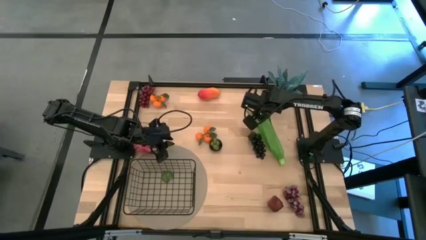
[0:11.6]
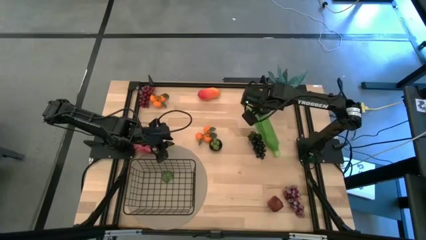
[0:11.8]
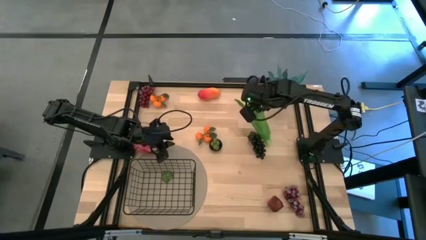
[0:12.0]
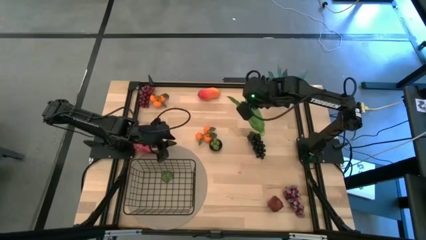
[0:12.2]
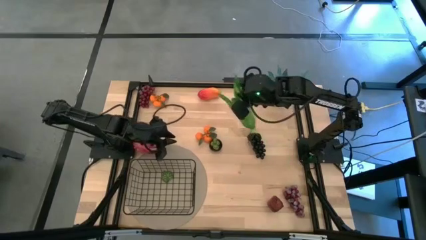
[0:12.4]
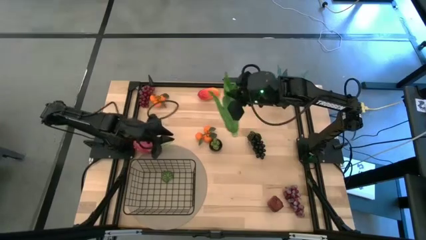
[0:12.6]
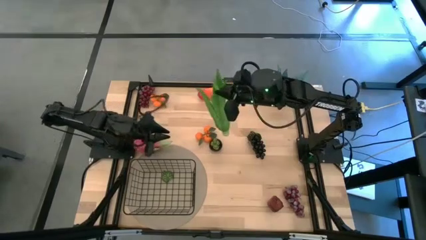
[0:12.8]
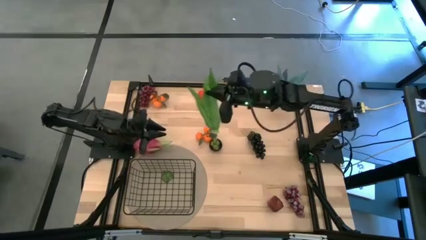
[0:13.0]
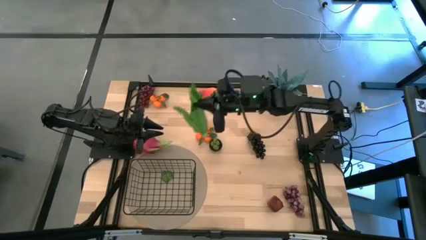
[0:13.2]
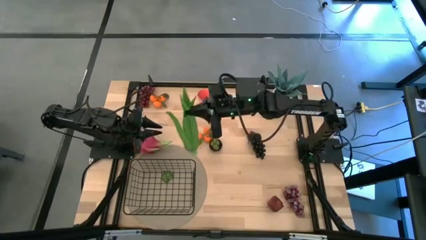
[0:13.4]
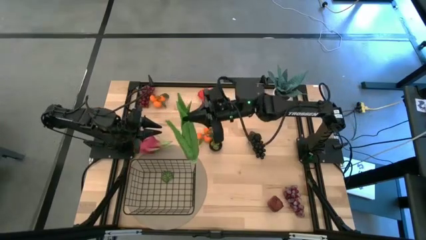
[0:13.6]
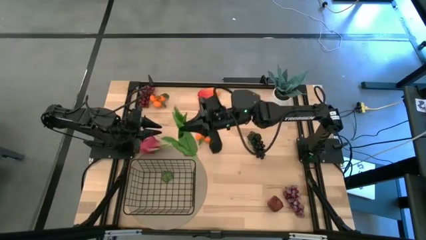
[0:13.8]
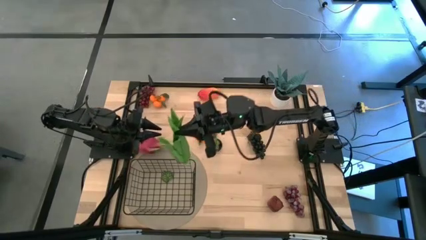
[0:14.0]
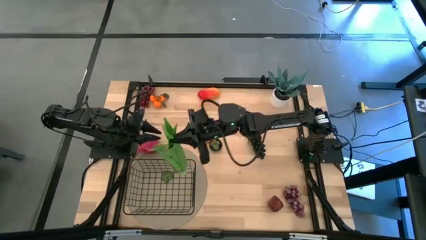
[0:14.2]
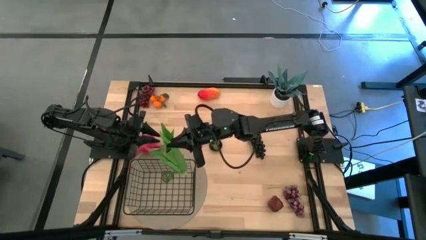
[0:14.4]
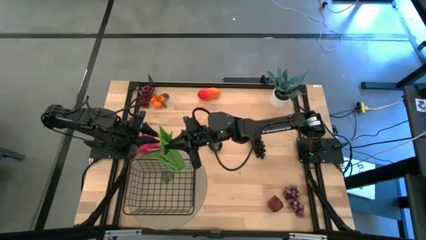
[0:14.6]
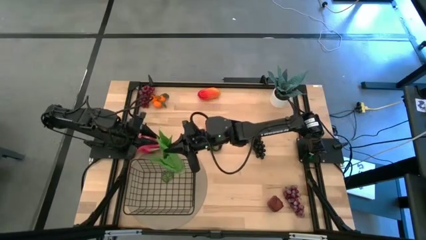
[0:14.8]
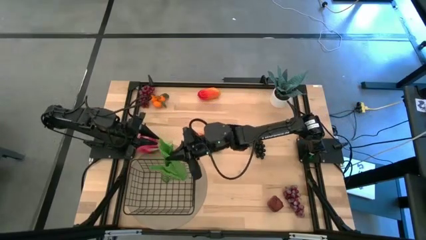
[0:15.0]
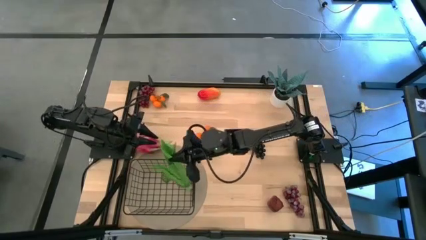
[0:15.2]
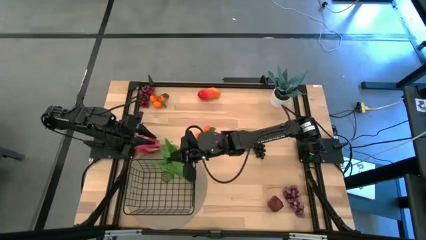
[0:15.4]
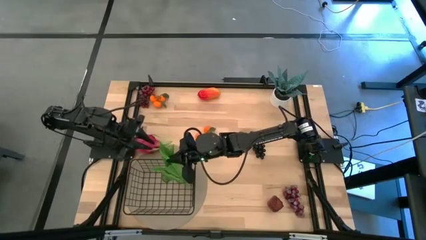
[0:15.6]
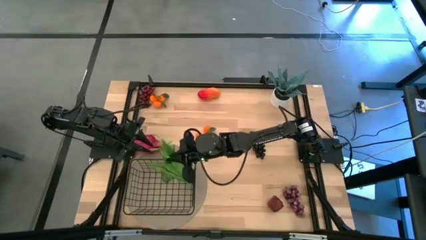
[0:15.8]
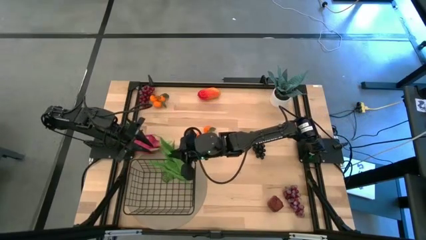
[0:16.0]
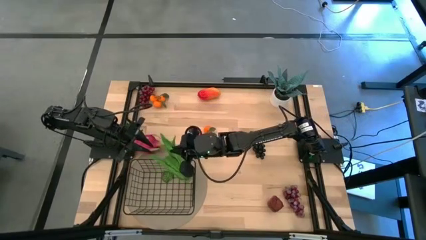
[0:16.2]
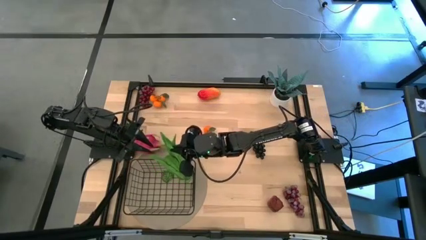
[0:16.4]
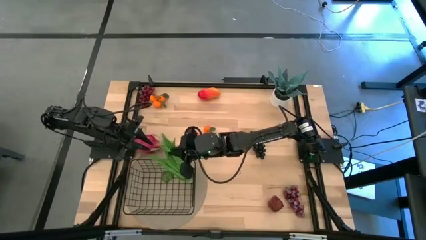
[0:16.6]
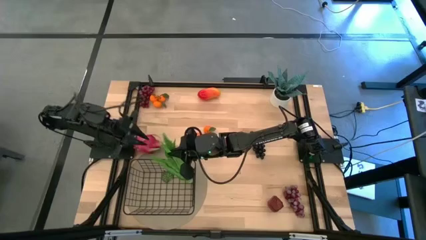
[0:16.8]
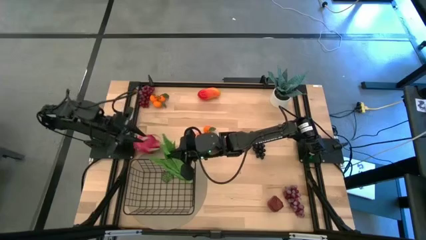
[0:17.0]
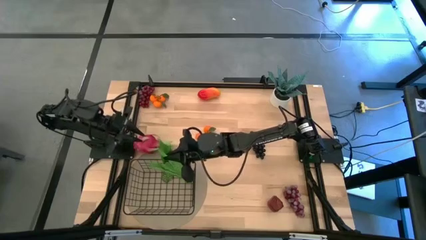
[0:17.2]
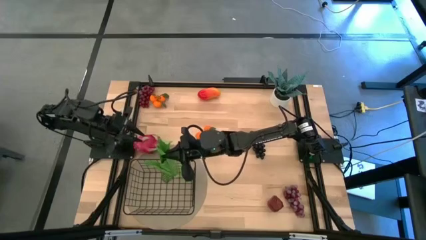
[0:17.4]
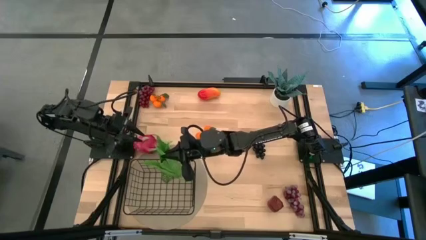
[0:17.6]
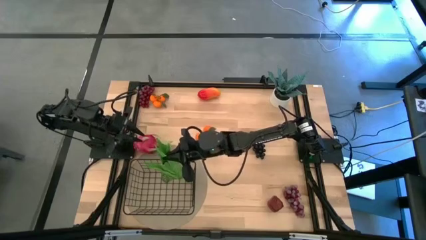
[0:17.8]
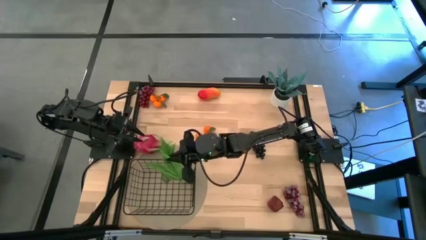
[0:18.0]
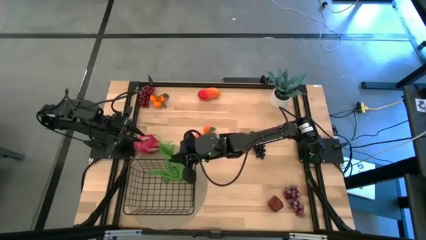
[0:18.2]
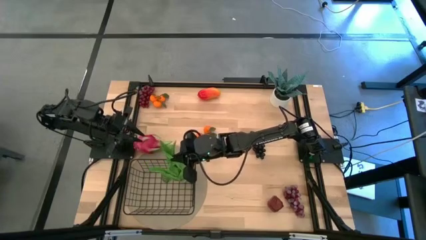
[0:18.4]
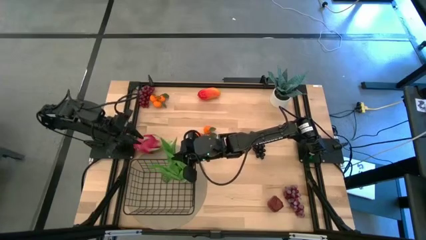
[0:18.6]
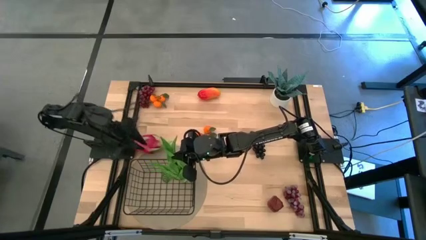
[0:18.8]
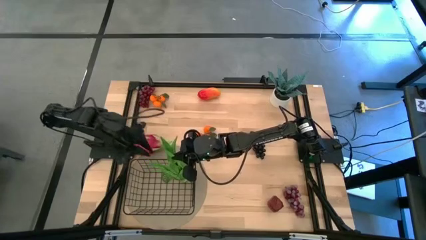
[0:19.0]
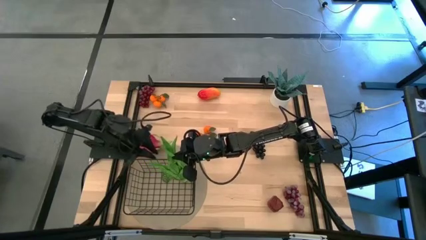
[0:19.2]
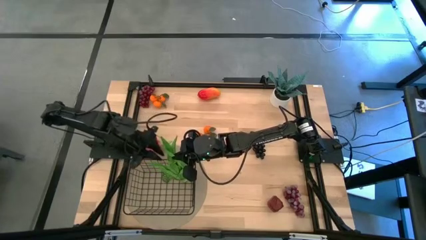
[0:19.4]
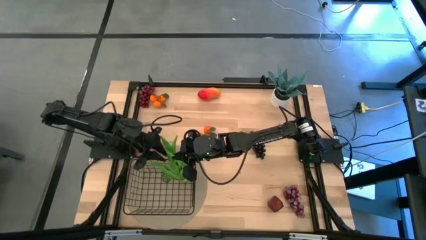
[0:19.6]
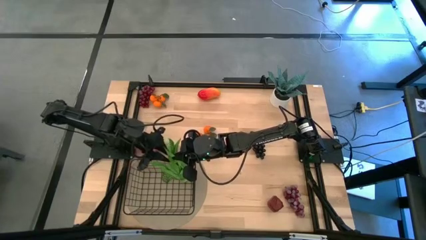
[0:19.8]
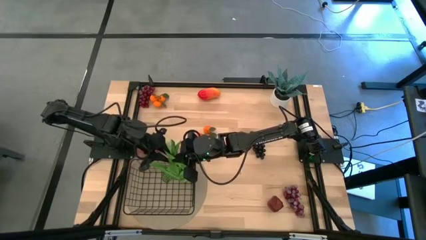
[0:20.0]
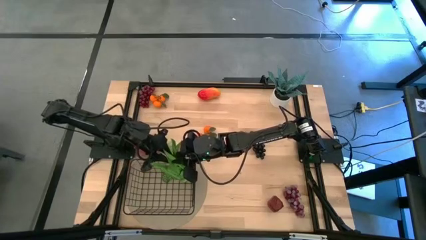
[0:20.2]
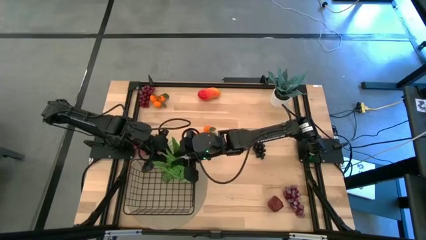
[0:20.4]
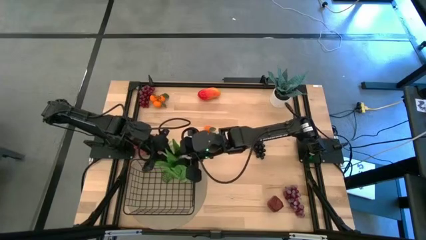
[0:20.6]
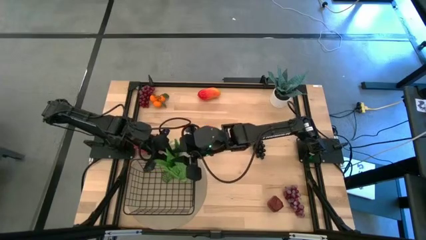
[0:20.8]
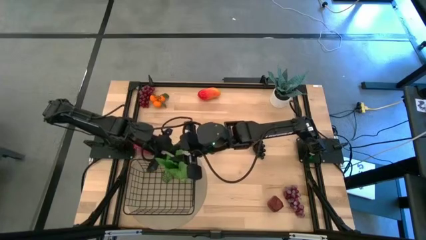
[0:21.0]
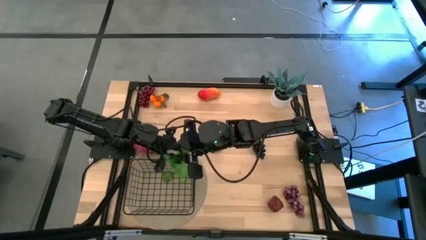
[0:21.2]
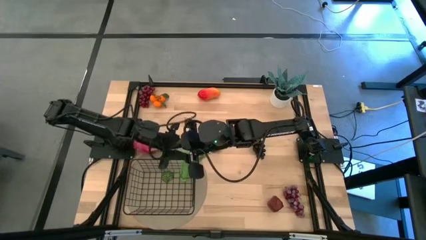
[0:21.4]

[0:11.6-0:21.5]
Task: Build produce basket
Put the green lettuce into the black wire basket

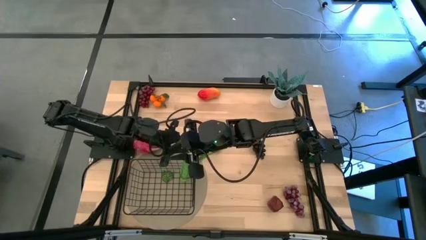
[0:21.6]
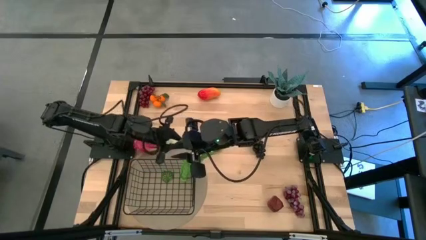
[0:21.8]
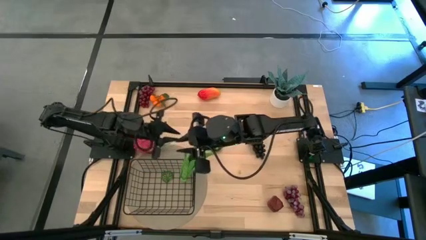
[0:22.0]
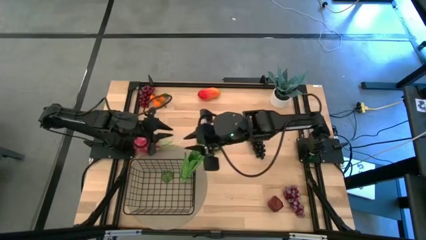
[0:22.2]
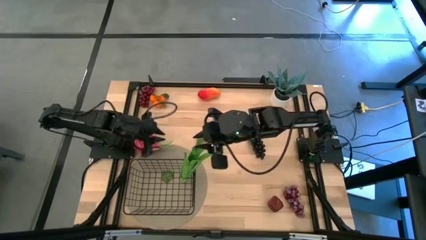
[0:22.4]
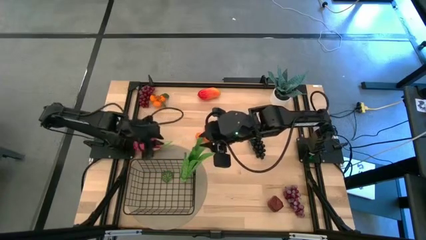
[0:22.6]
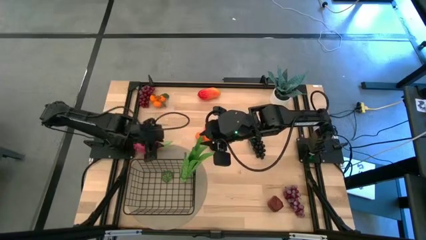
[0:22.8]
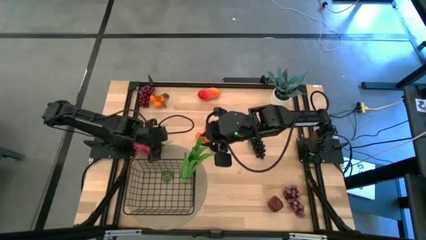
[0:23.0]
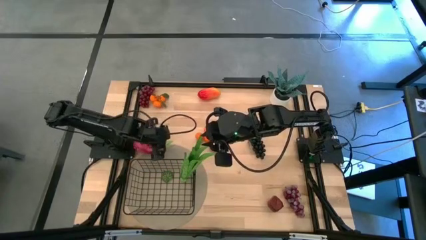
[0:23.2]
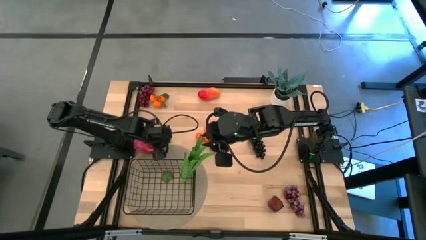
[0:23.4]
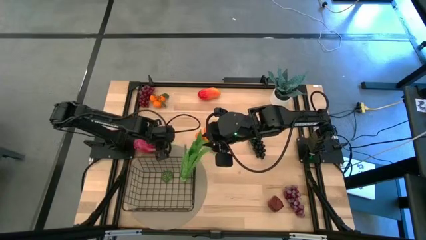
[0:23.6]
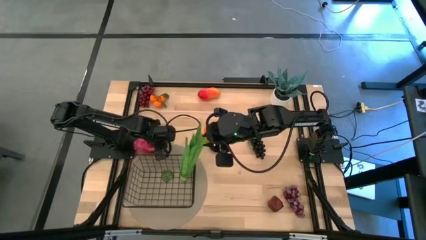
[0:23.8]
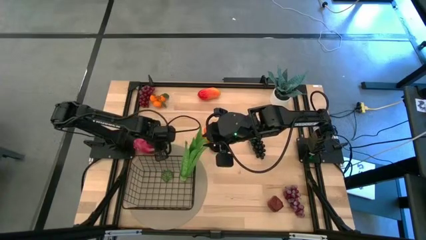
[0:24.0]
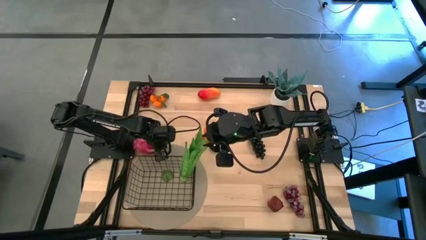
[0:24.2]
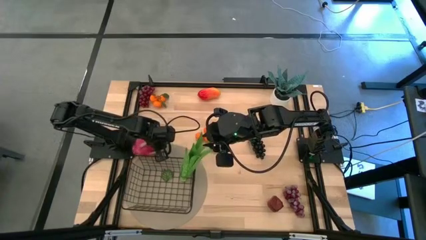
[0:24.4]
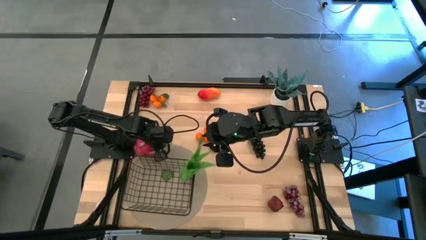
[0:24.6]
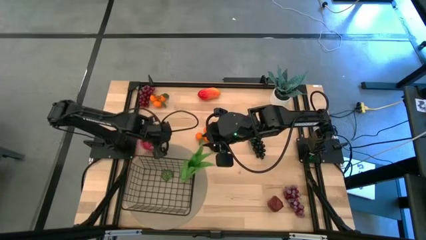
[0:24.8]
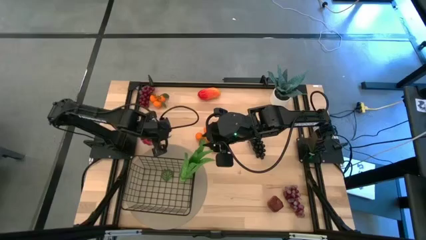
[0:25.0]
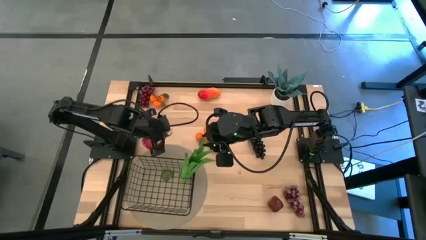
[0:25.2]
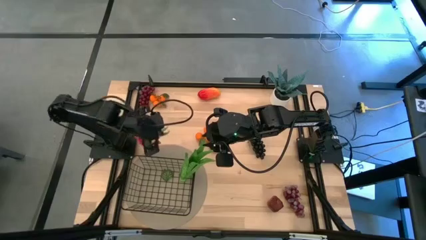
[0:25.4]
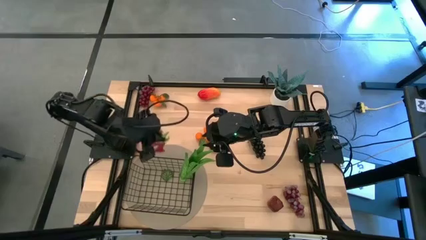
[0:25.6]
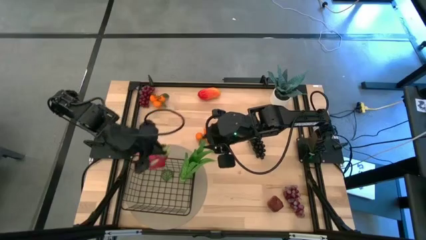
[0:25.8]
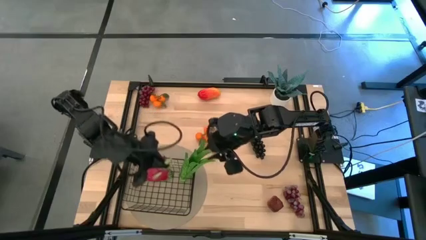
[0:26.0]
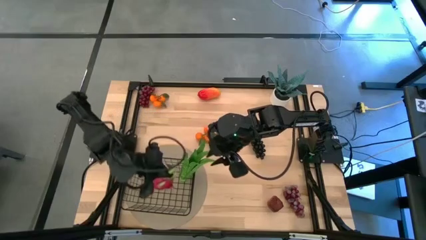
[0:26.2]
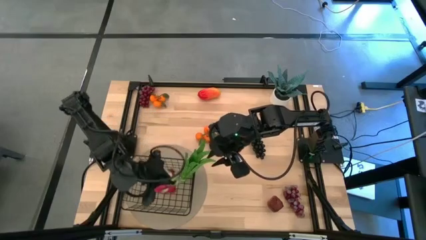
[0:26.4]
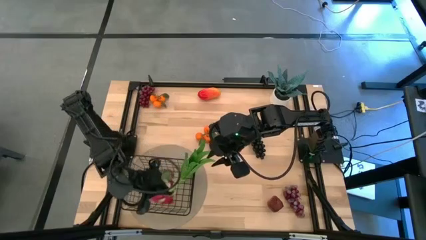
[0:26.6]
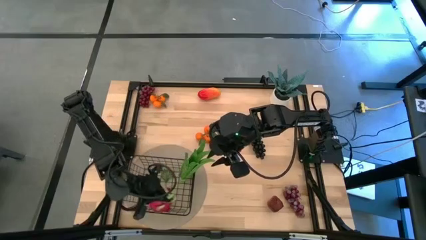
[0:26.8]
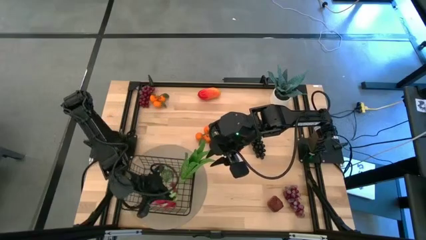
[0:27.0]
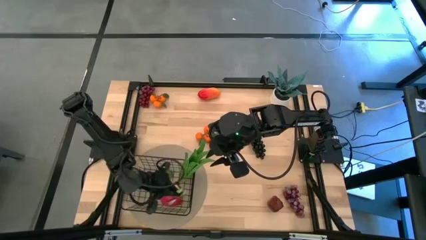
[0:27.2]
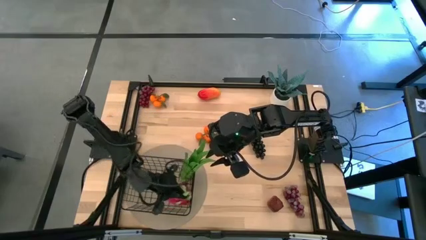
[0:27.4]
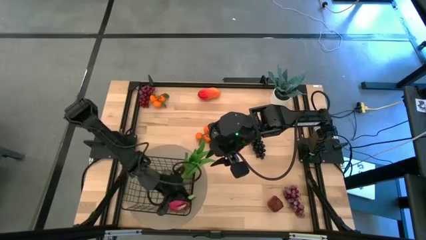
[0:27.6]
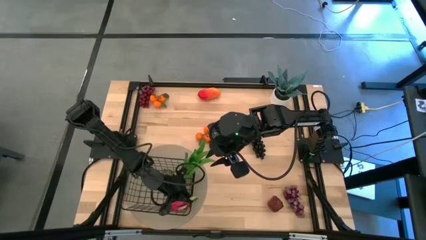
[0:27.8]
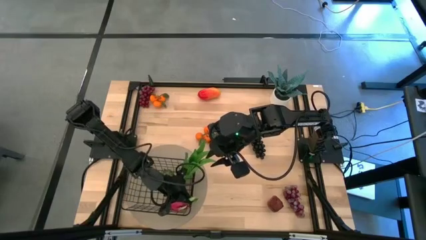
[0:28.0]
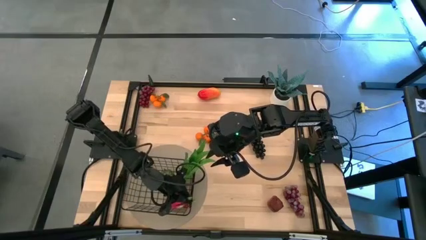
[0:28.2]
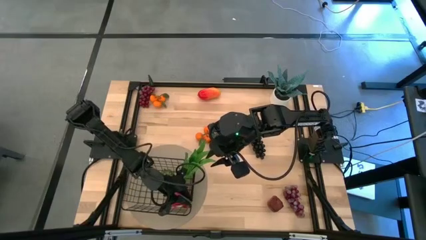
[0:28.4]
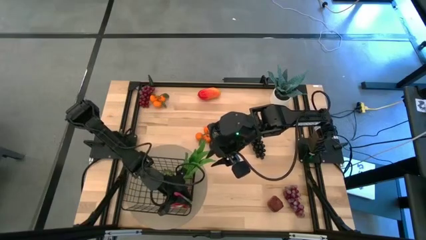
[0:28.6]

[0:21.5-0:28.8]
Put the pink dragon fruit into the black wire basket
